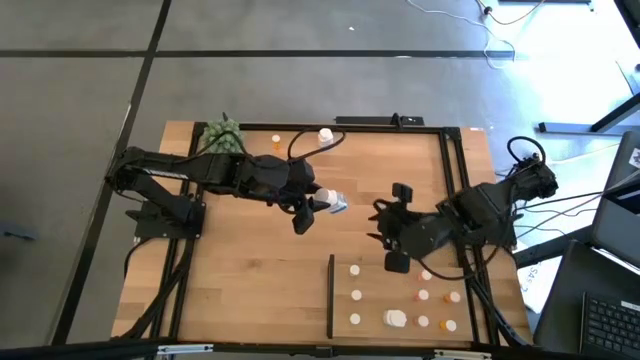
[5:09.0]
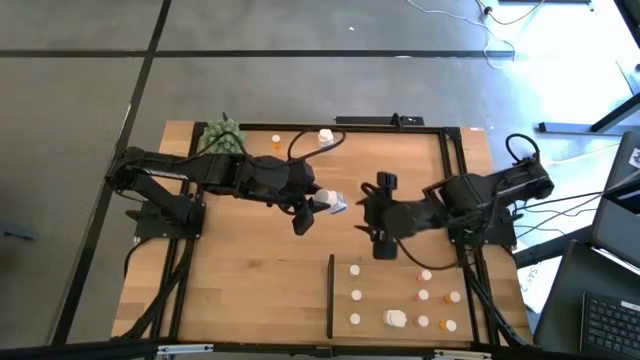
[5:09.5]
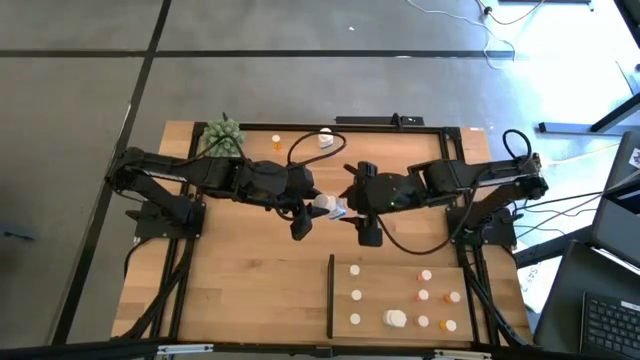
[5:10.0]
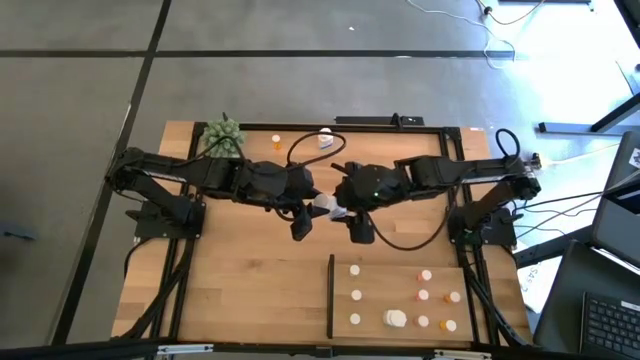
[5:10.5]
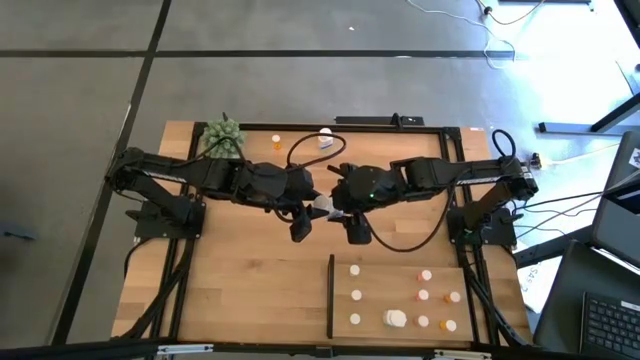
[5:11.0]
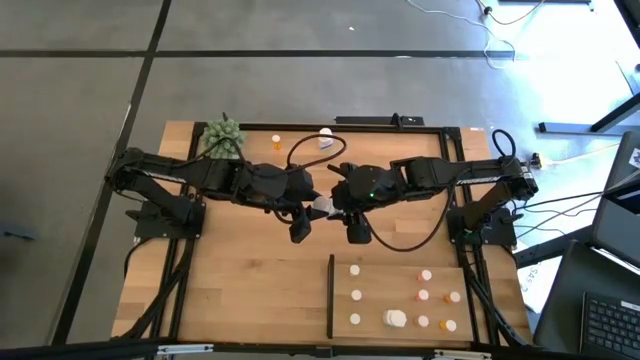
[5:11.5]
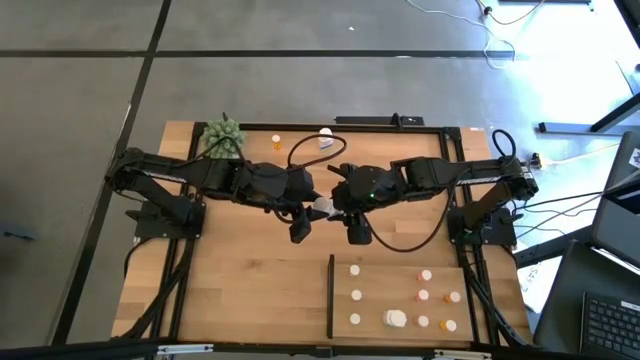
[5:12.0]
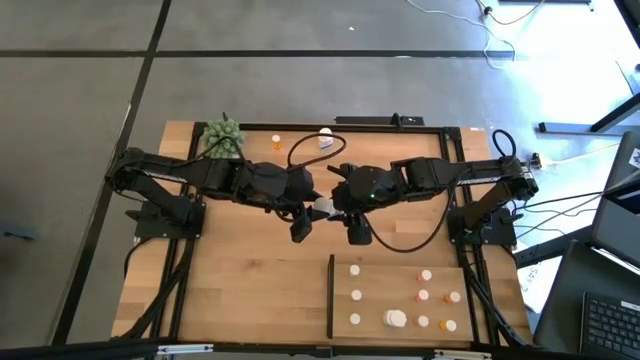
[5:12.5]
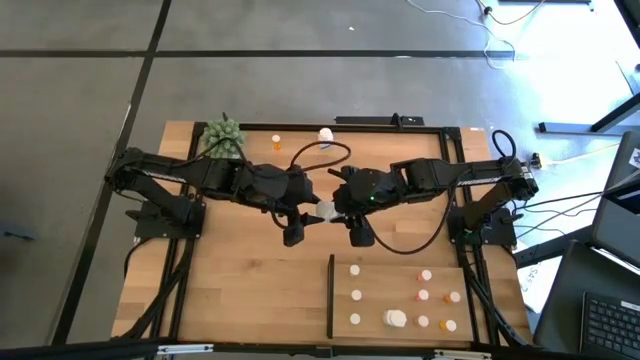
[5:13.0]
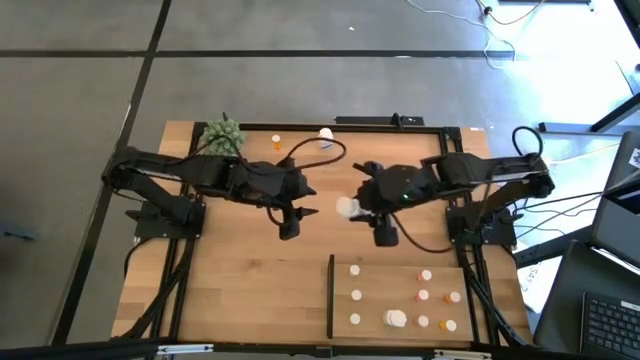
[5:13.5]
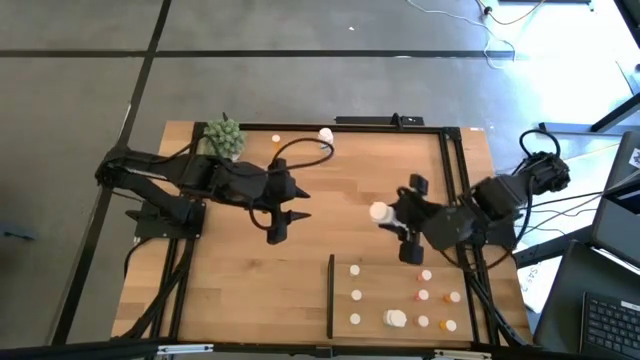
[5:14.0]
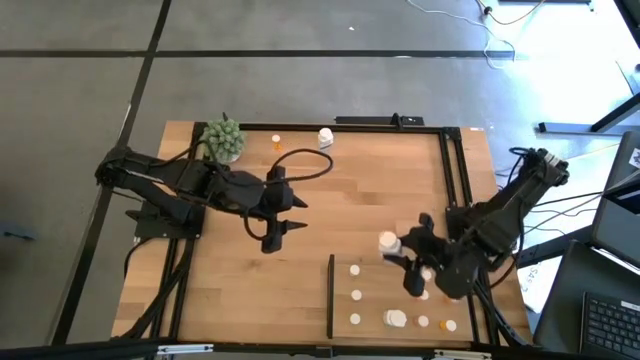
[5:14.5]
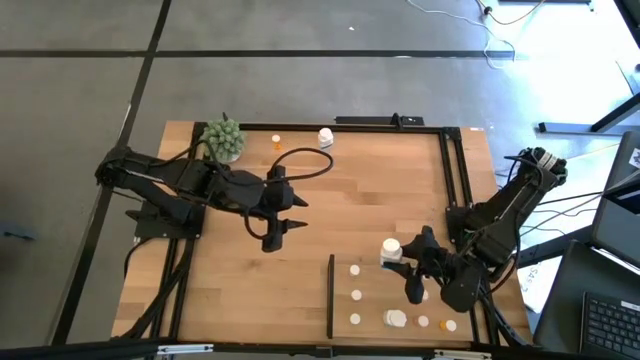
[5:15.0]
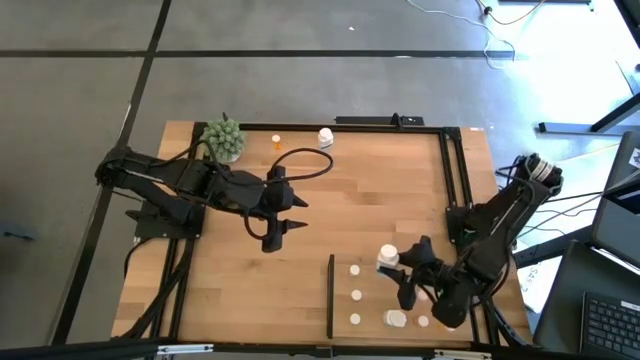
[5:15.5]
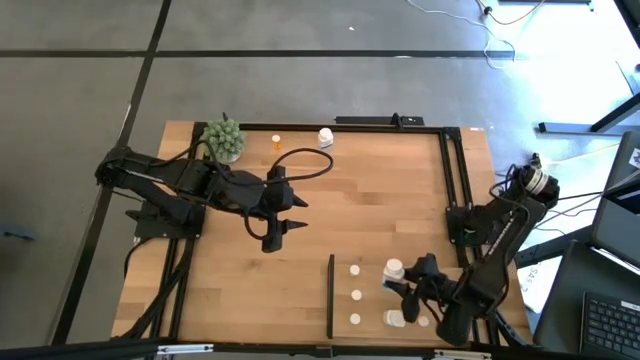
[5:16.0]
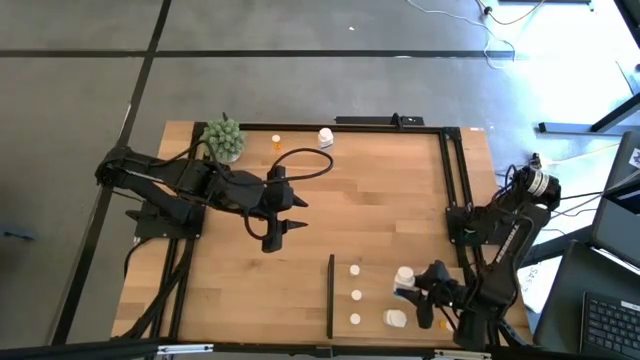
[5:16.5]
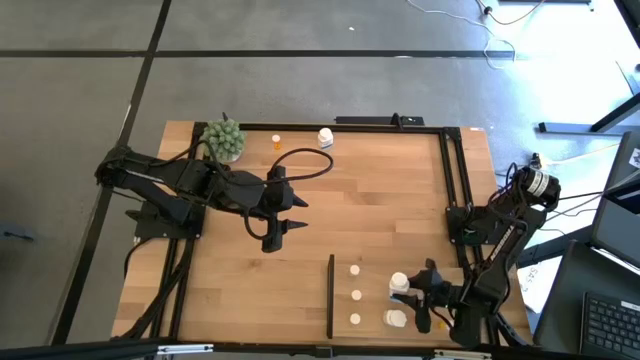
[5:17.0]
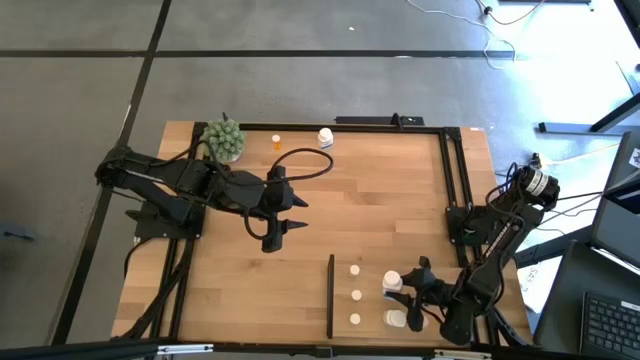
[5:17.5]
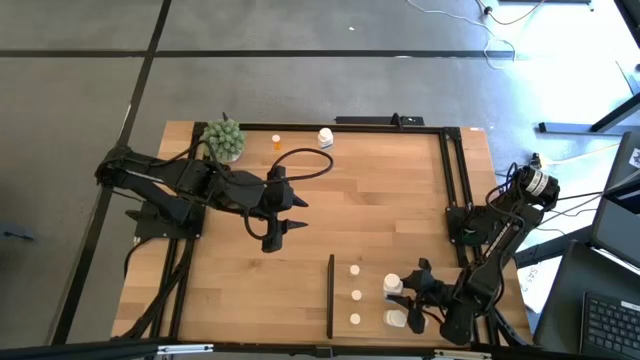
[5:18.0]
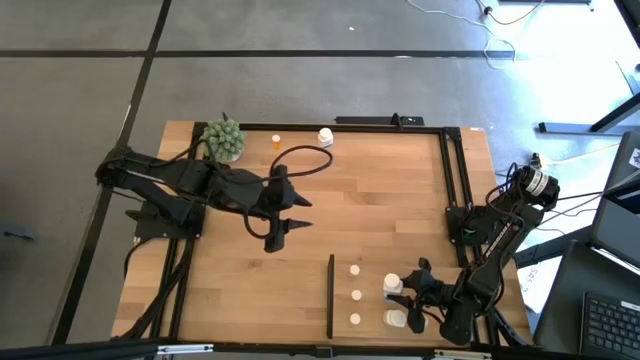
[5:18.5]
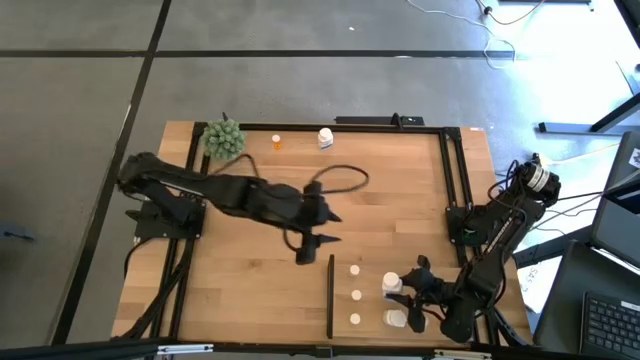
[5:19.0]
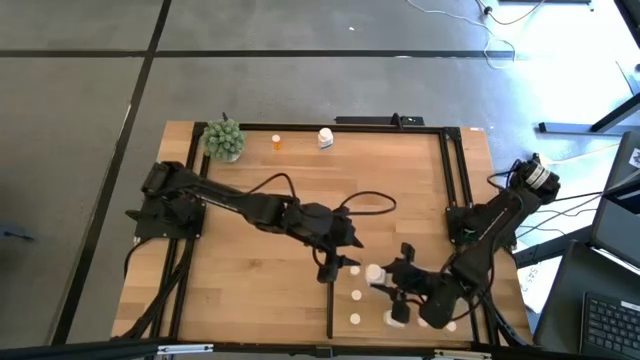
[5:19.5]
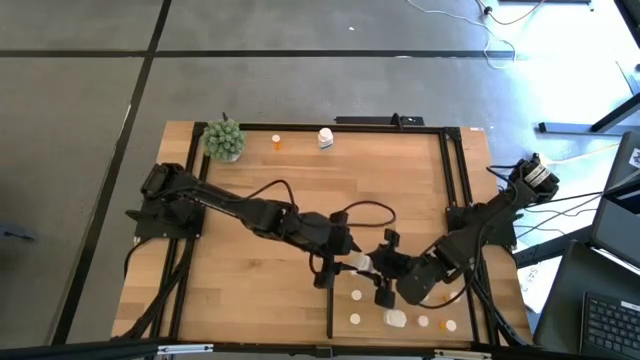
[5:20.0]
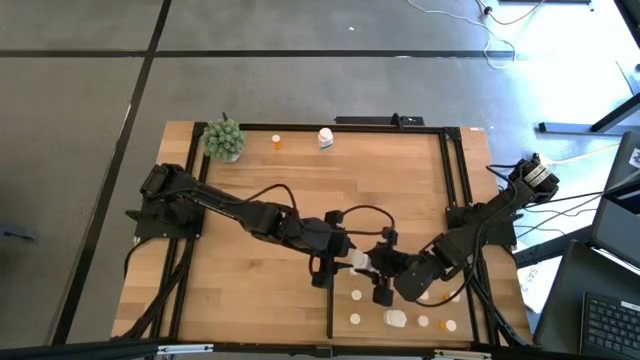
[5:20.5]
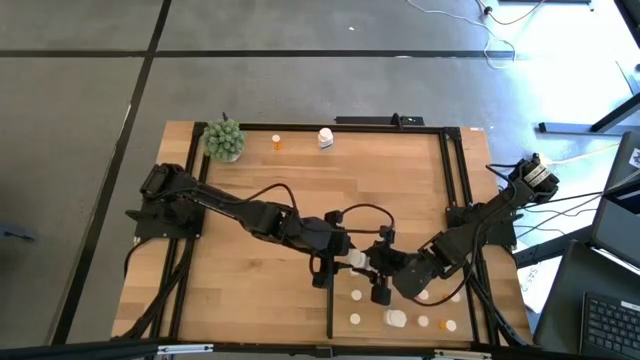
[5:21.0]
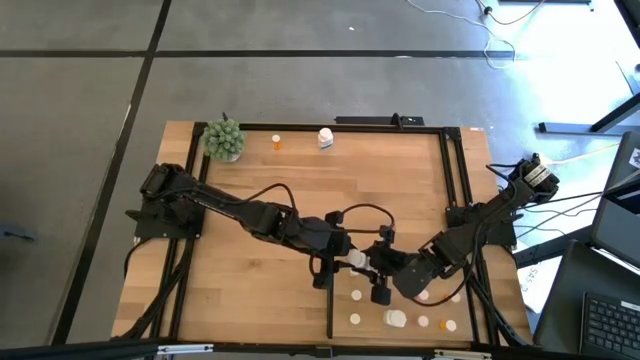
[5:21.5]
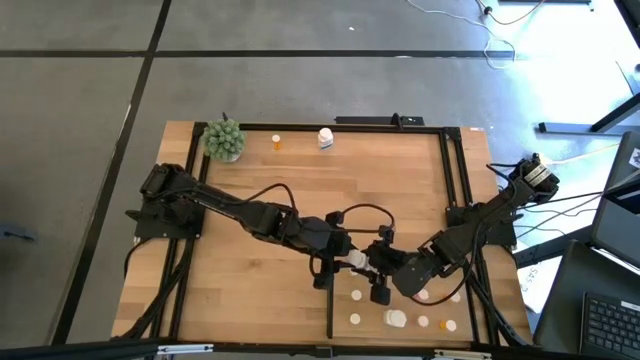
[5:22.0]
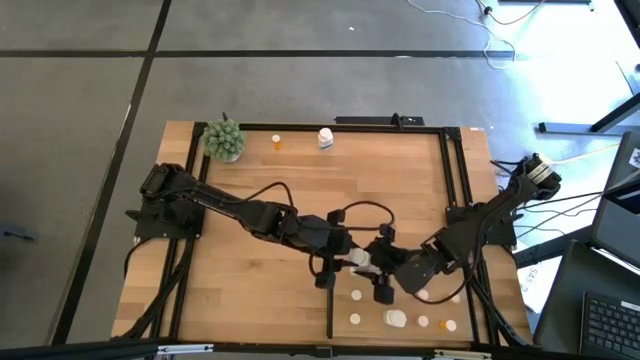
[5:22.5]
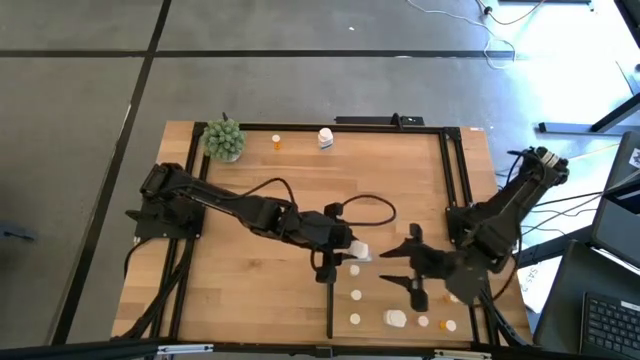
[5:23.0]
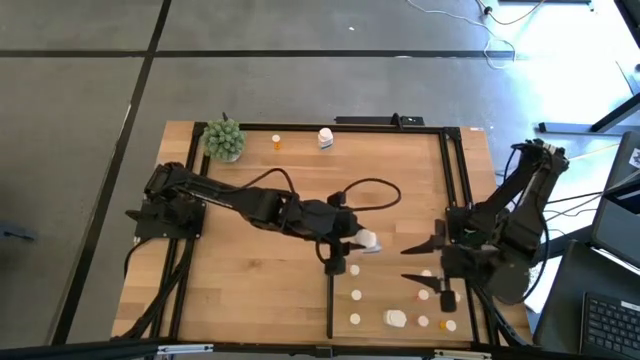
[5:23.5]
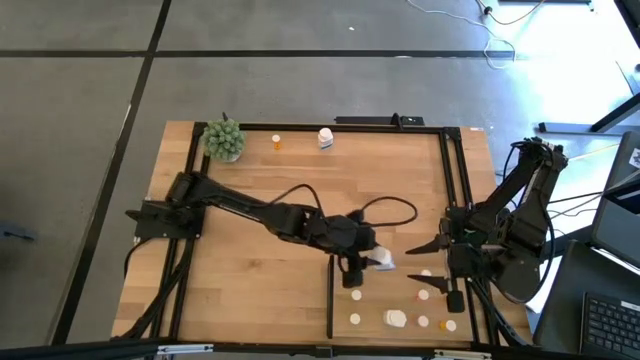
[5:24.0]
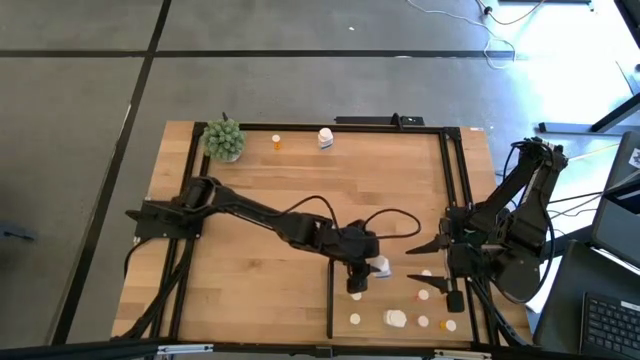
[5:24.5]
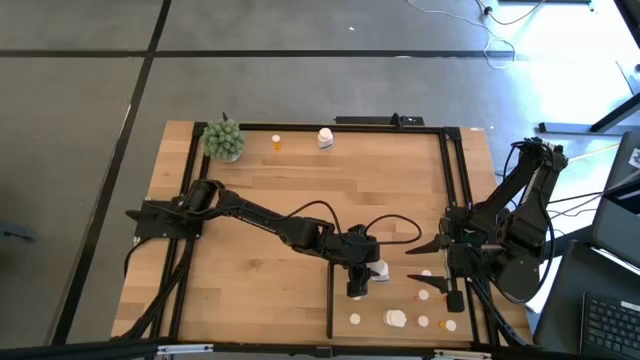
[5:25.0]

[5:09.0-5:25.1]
Task: Pick and place medicine bottles onto shelf by color
Put the bottom supplement bottle on the shelf aligned with the other supplement bottle

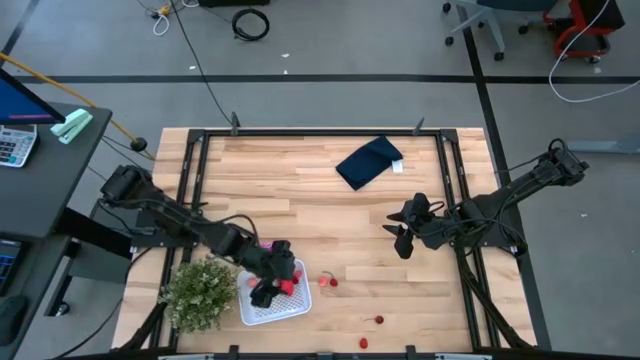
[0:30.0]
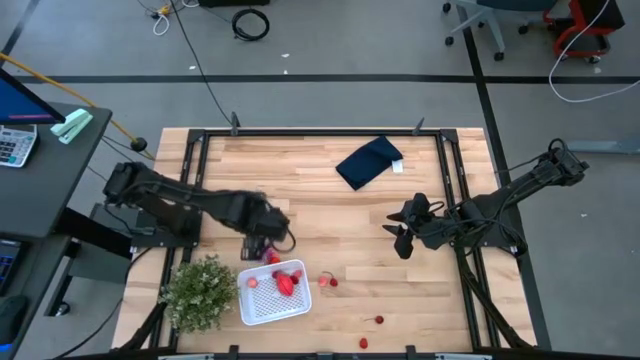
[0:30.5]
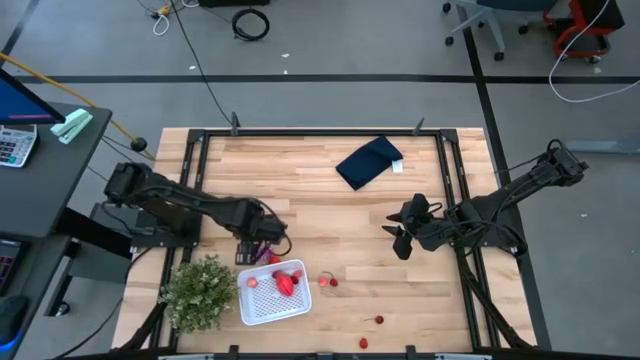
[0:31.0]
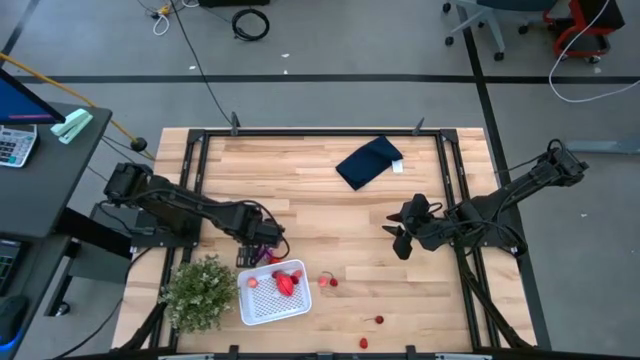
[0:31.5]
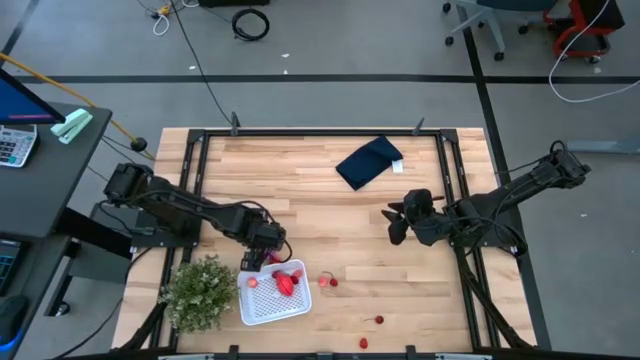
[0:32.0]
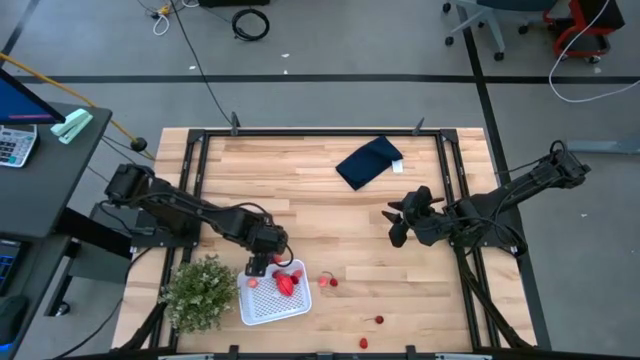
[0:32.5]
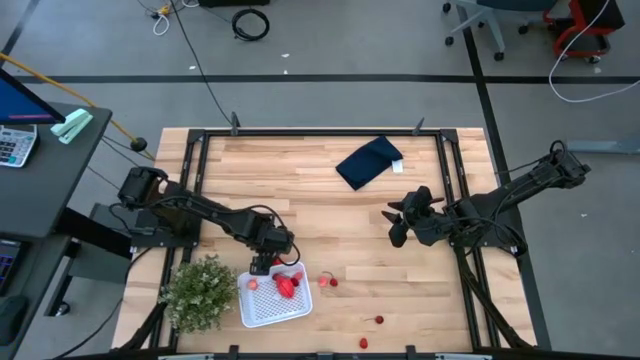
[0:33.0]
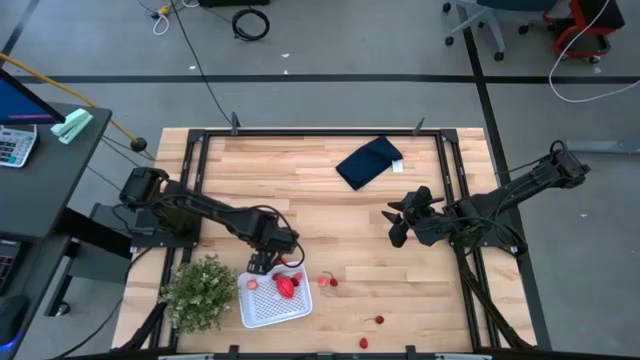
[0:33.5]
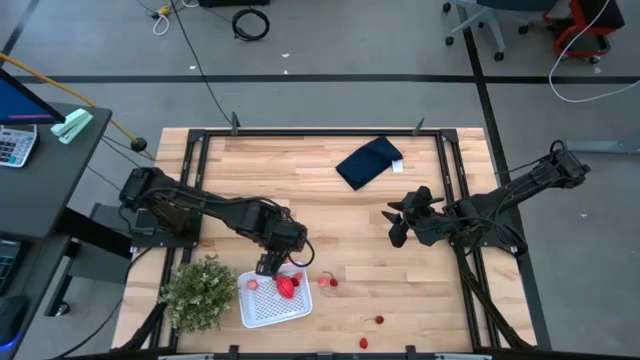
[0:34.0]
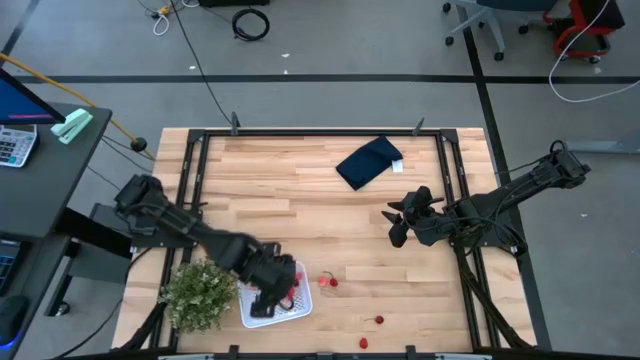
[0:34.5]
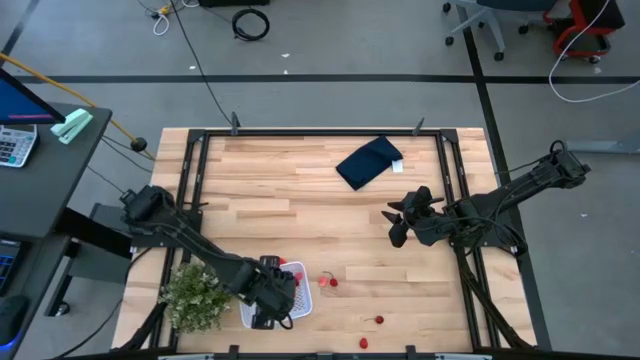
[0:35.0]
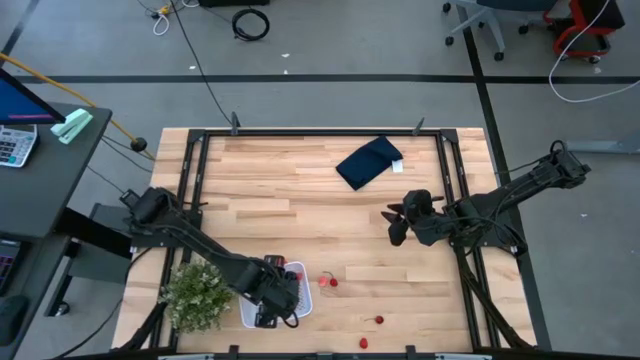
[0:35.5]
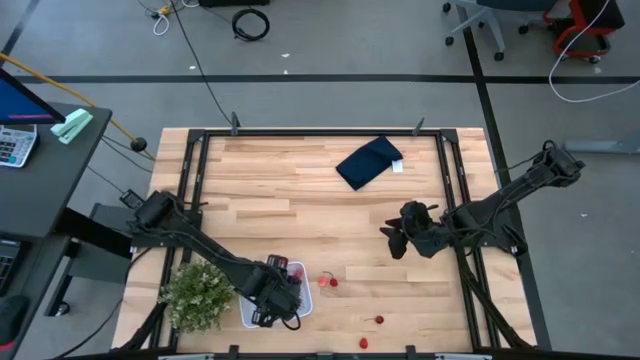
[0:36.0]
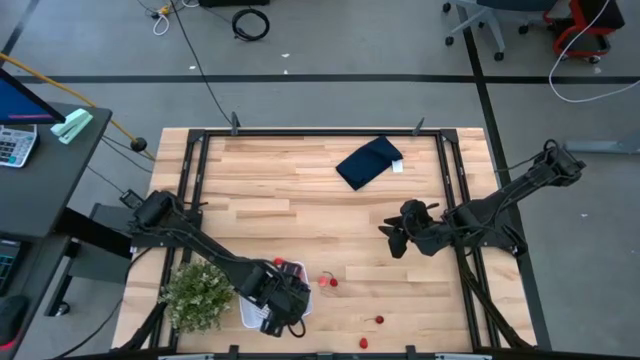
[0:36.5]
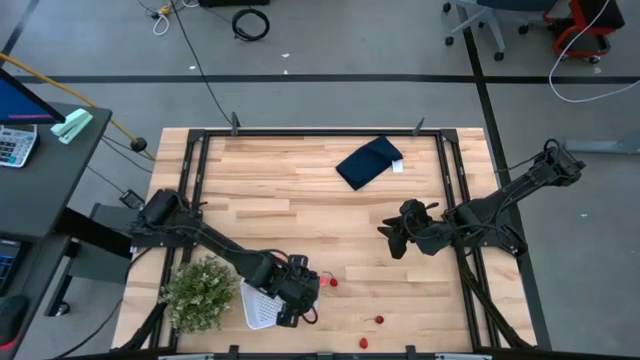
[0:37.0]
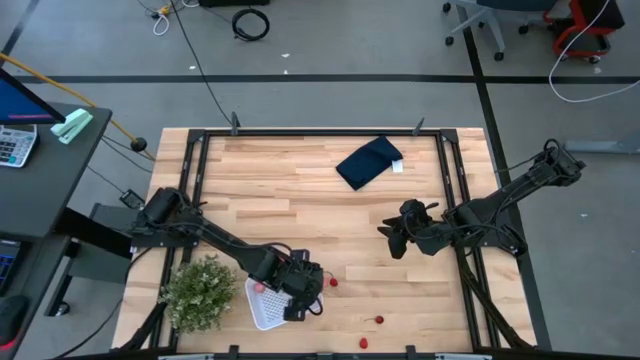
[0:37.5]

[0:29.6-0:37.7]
Task: Pick and placing Produce into tupperware
Put the onion into the white bin
